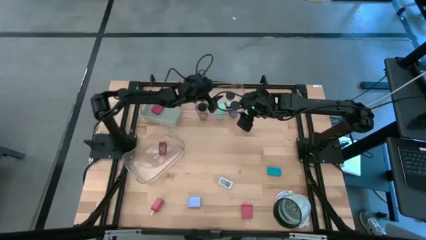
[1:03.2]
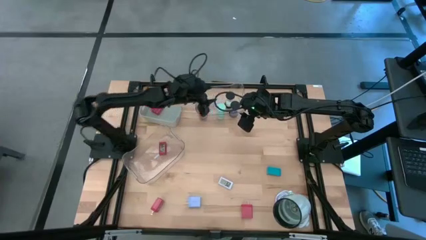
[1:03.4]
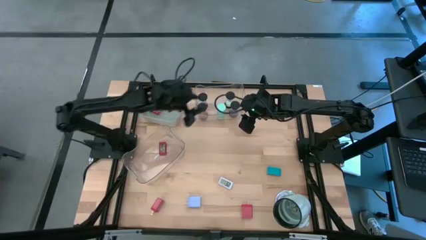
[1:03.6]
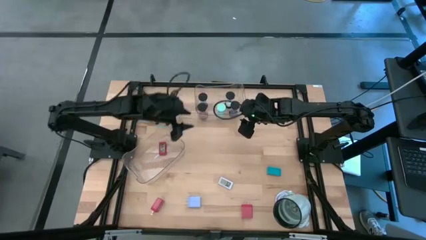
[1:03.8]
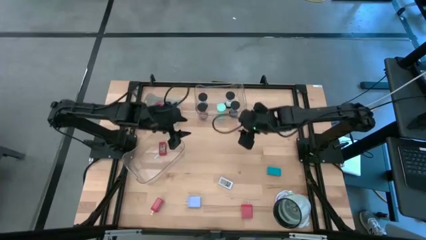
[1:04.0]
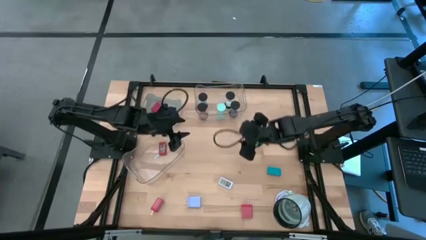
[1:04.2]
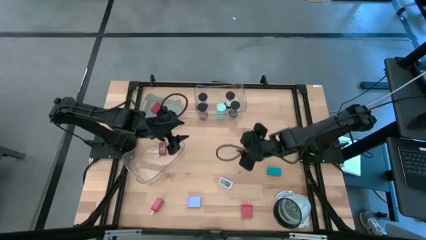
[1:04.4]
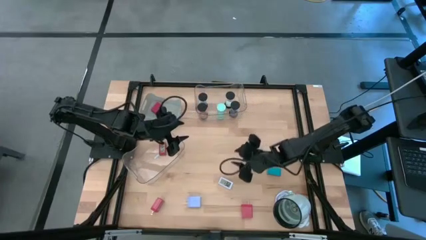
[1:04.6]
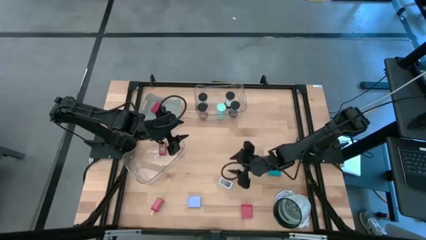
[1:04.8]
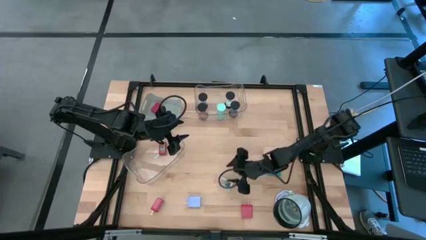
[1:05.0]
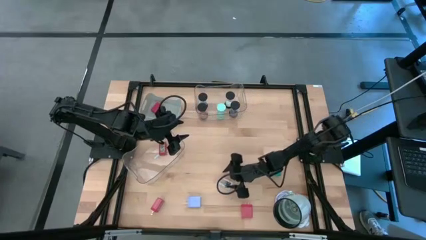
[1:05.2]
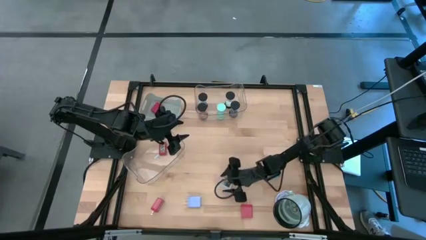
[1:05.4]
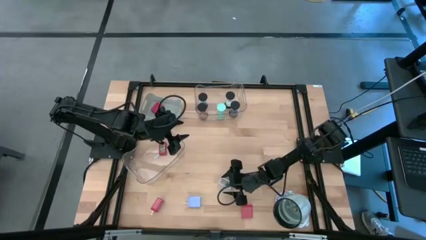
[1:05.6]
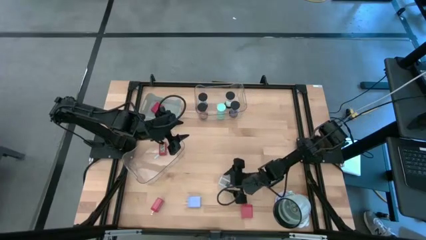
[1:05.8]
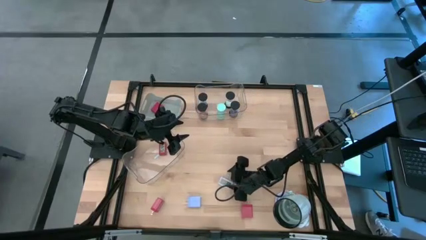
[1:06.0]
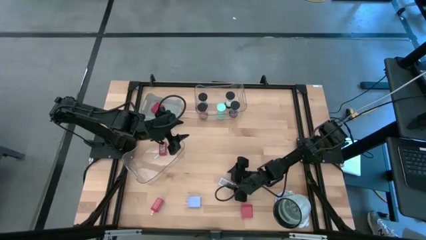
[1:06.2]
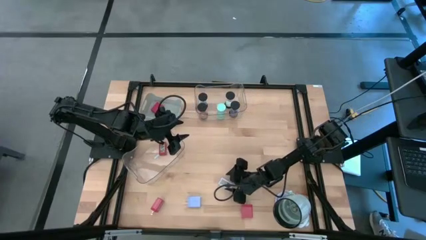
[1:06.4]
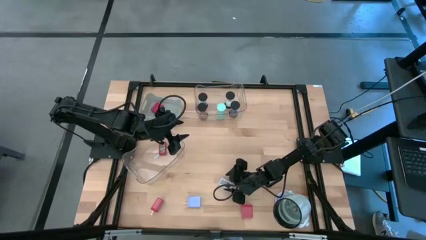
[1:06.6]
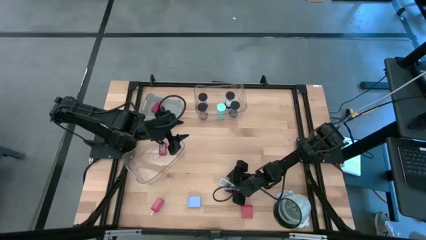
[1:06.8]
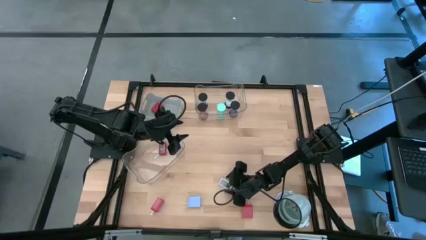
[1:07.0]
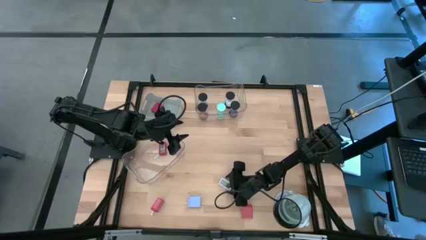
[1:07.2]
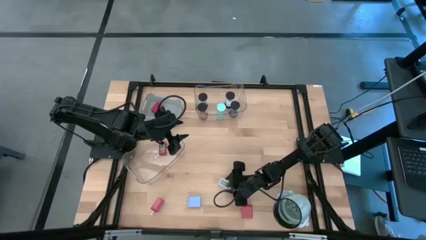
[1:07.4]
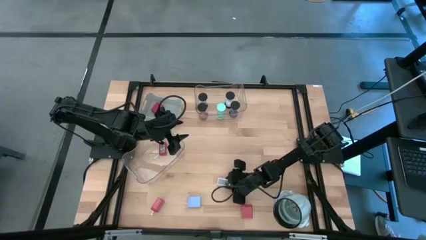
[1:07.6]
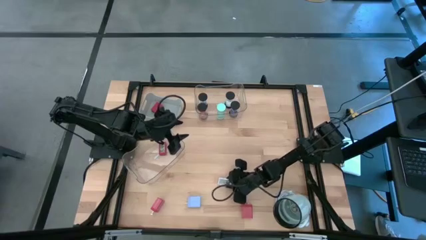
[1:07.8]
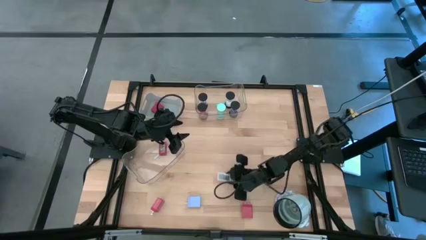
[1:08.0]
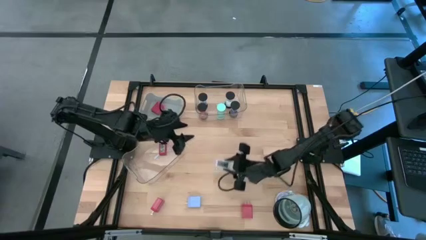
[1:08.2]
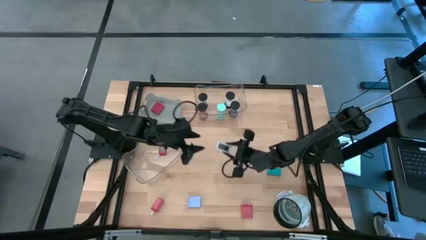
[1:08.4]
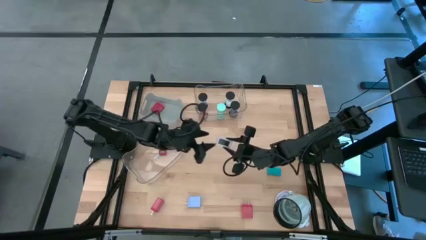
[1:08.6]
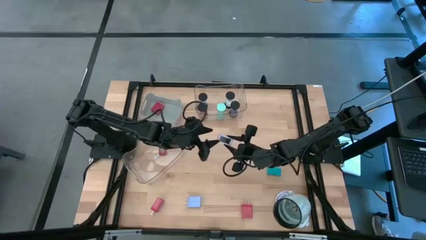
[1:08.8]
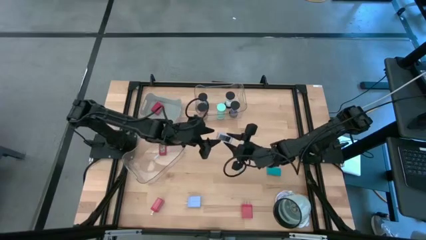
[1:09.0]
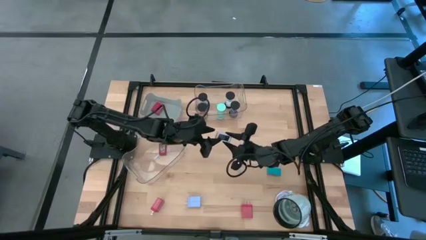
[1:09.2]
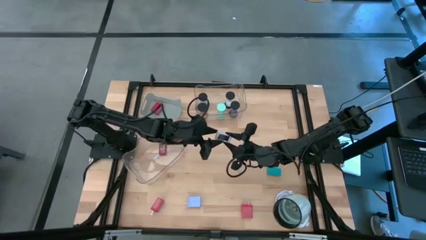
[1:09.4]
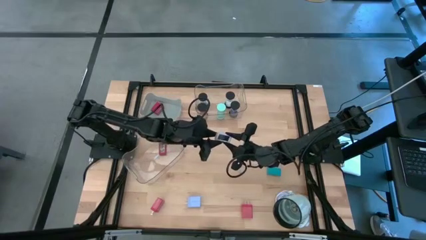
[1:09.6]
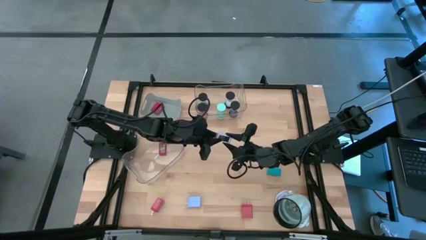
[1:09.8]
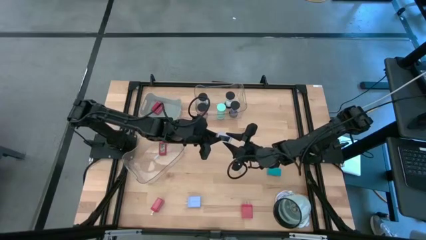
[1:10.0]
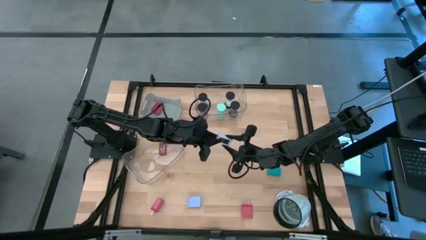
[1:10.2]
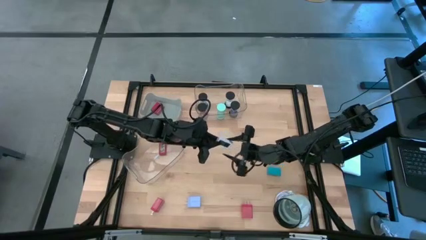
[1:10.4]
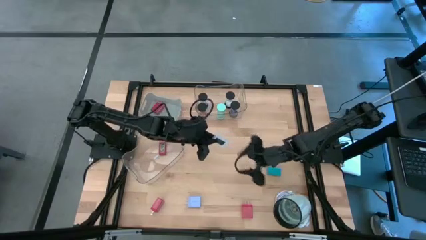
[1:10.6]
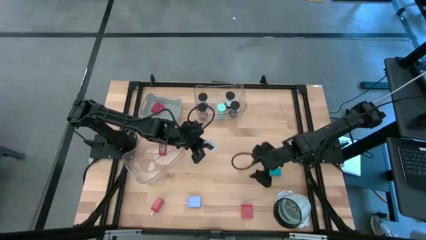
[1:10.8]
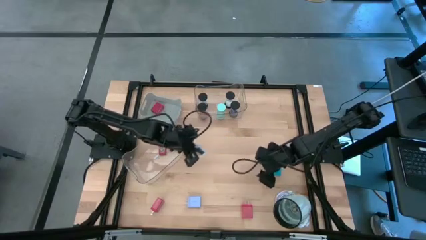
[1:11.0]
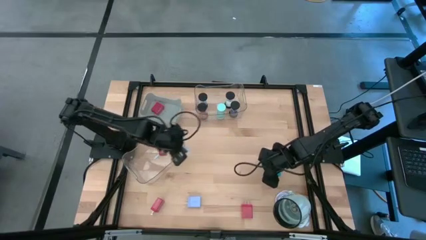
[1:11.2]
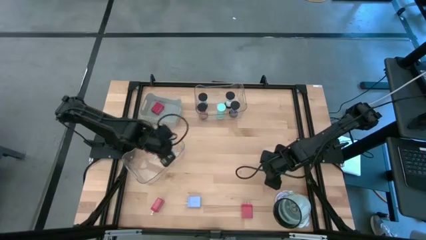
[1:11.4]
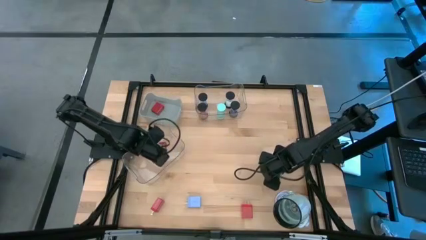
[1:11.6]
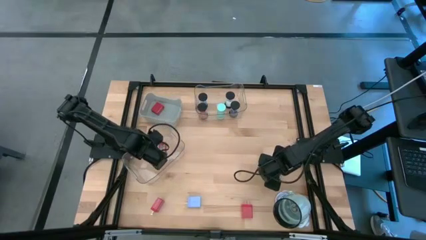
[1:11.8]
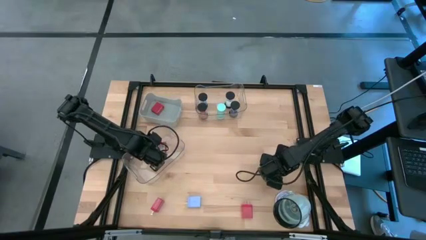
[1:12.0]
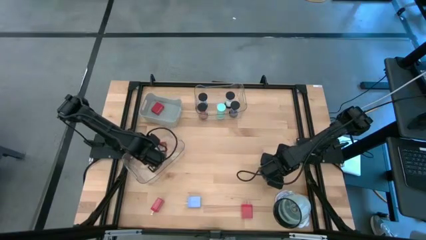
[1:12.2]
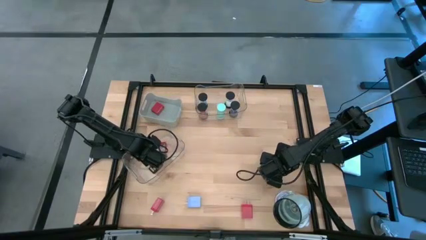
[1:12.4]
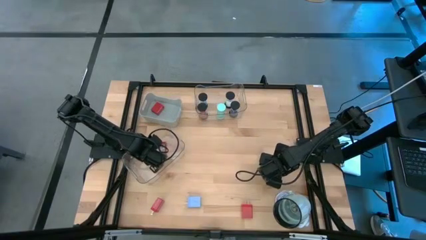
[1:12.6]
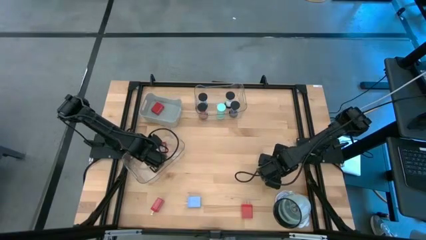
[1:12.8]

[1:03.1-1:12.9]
Task: Pick & Place Office items
Put the white digital clock into the bottom transparent bin

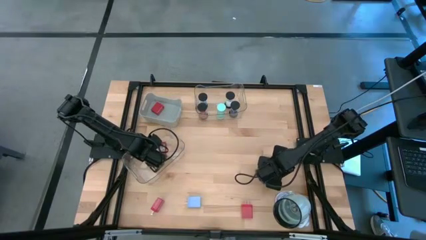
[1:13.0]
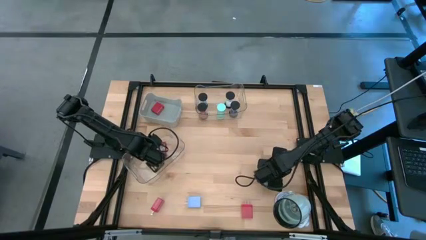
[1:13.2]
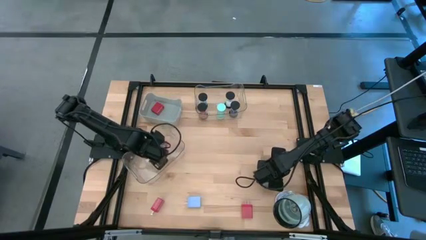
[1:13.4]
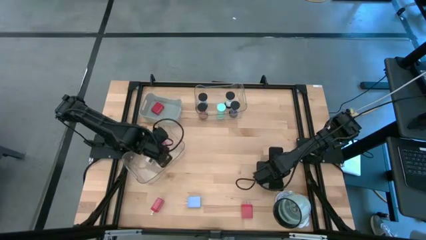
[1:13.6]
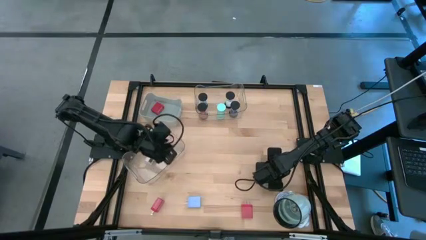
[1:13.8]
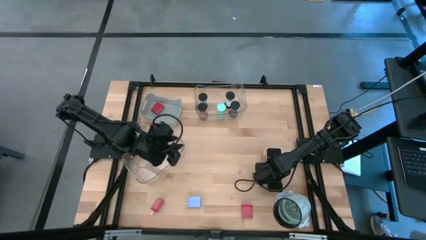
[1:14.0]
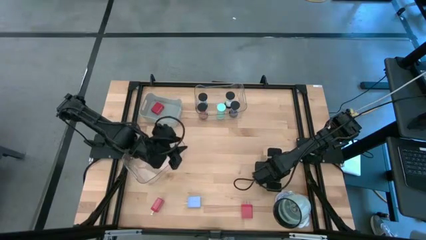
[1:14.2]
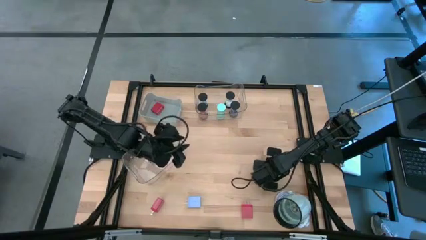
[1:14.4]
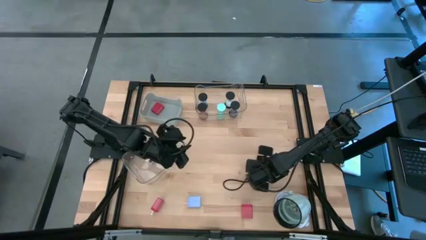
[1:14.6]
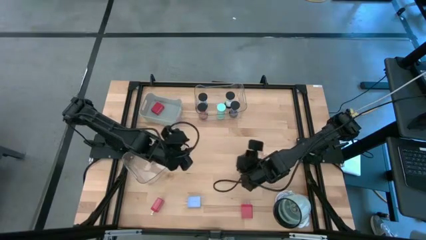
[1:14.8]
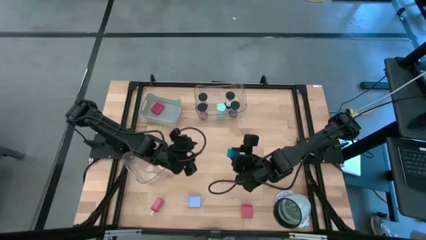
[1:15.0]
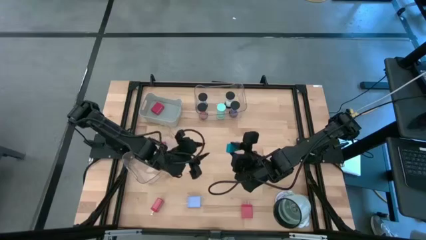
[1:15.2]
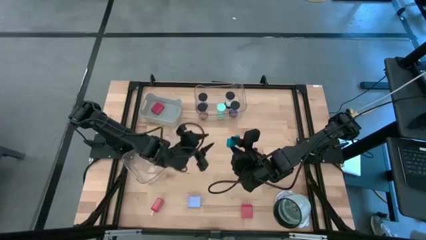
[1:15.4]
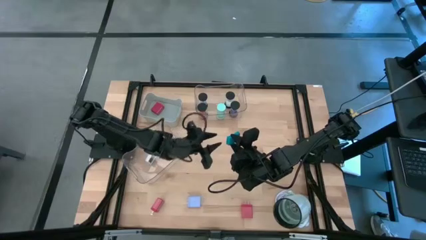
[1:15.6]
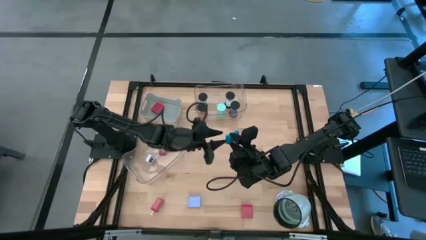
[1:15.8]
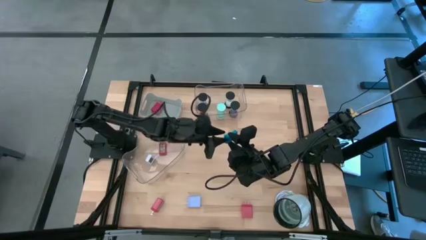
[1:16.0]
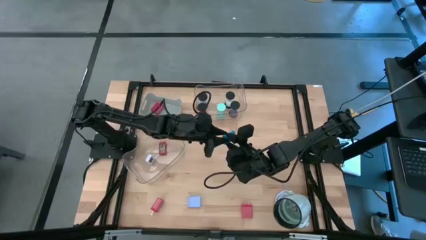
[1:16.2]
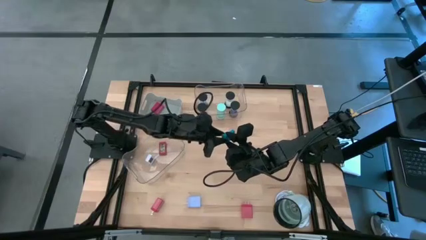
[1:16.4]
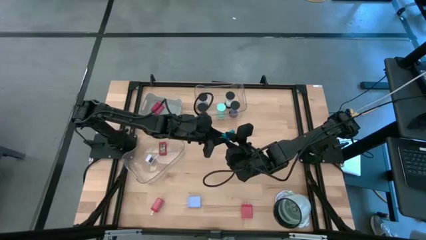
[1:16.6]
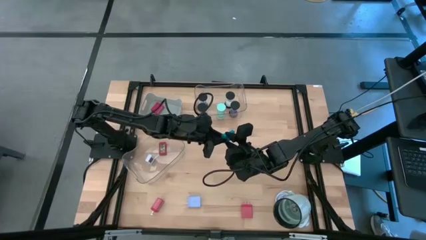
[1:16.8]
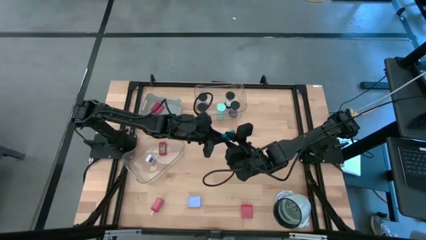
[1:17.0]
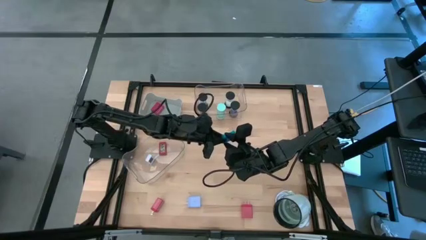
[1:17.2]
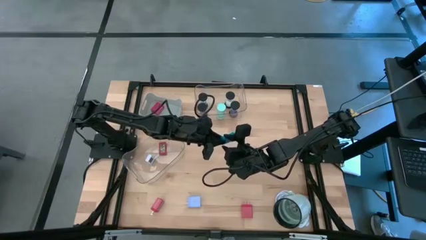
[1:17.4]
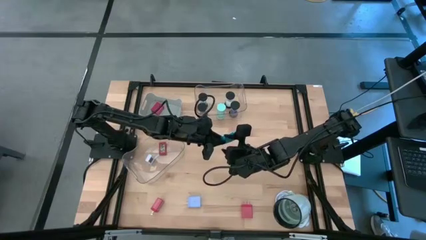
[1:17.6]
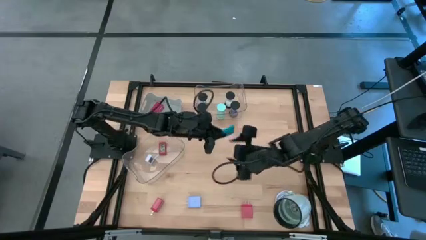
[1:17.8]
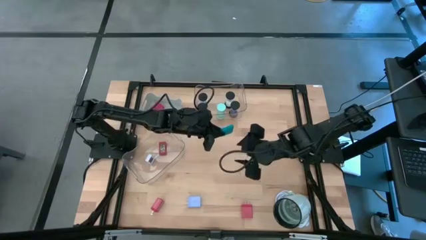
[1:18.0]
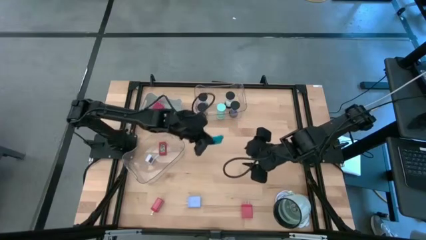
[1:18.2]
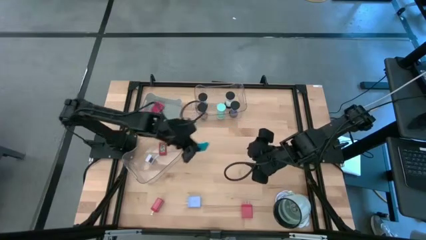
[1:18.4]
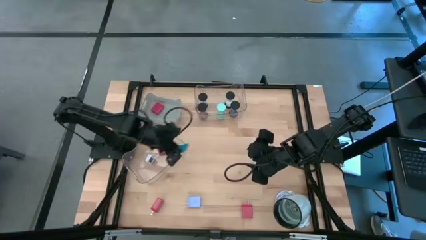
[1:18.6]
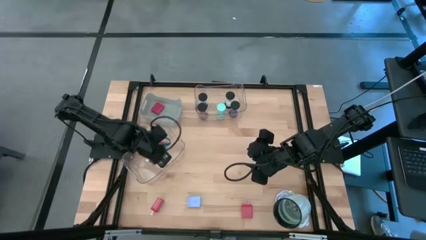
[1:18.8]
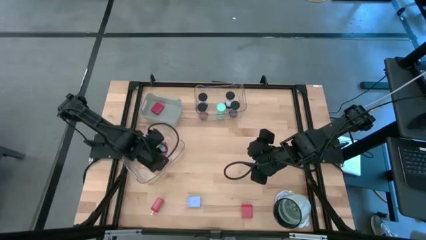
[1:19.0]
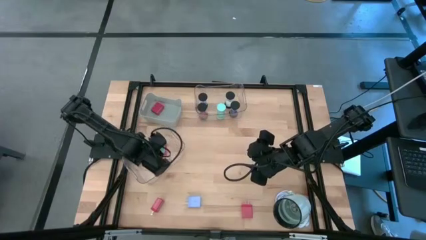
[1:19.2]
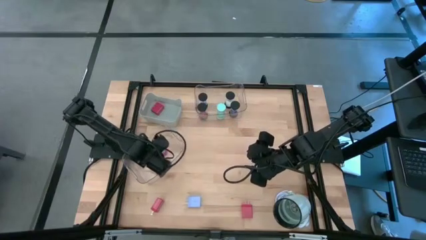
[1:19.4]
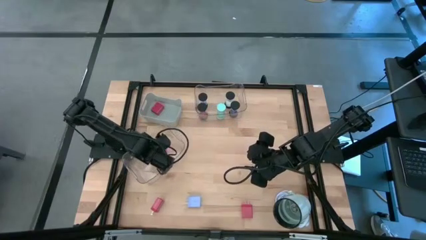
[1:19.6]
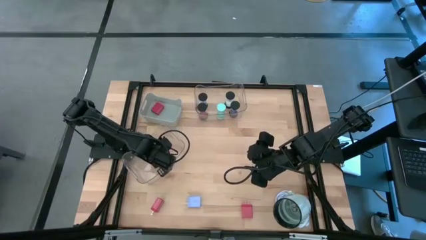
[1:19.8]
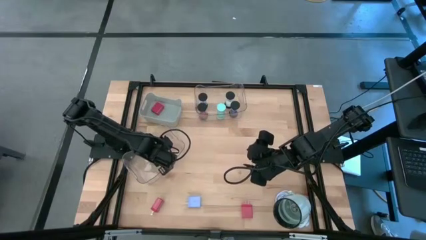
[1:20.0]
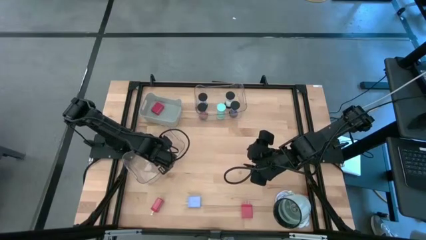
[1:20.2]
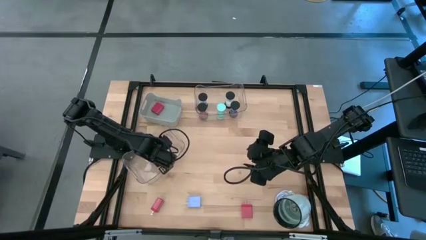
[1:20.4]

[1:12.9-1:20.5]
Put the blue digital clock into the bottom transparent bin
